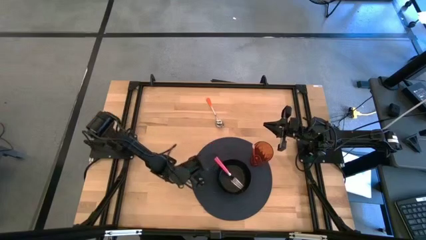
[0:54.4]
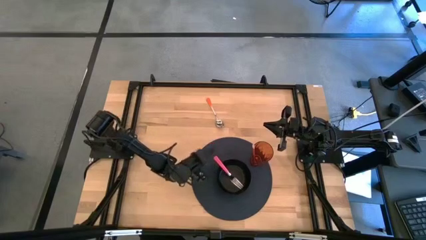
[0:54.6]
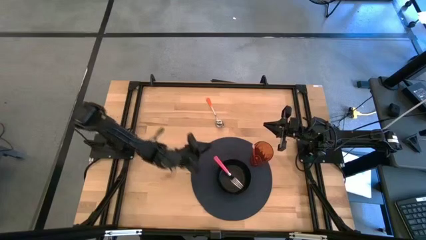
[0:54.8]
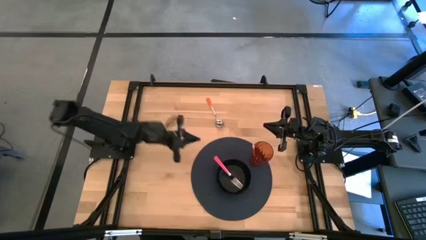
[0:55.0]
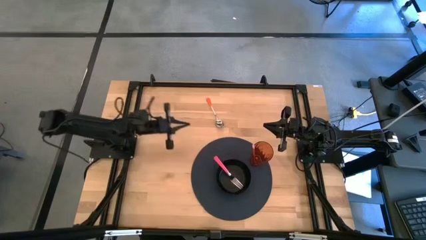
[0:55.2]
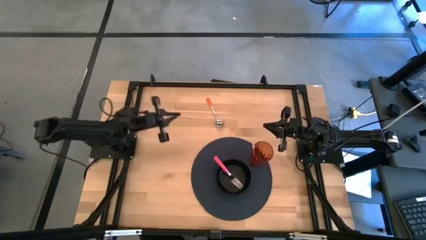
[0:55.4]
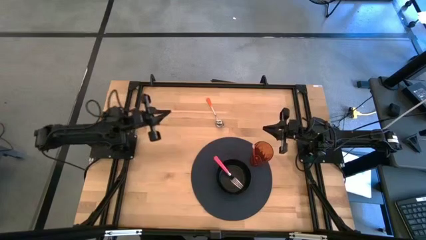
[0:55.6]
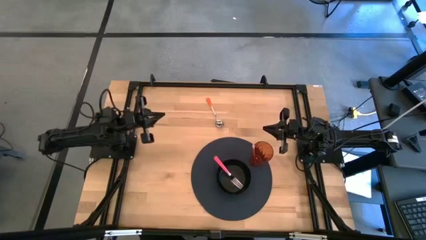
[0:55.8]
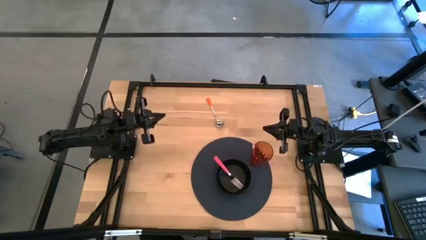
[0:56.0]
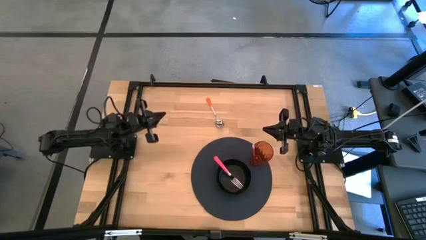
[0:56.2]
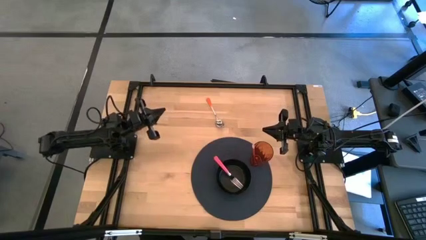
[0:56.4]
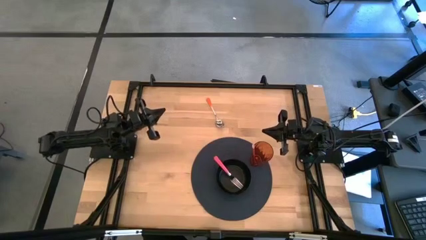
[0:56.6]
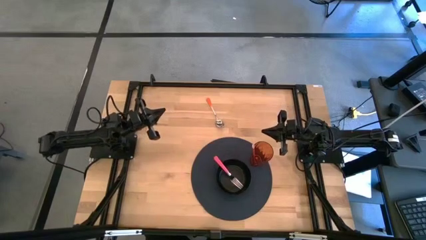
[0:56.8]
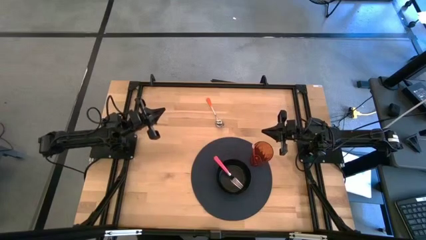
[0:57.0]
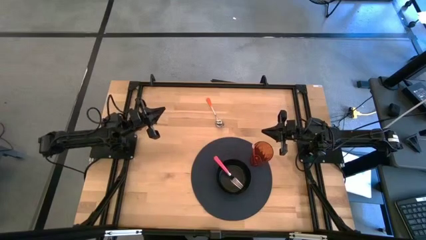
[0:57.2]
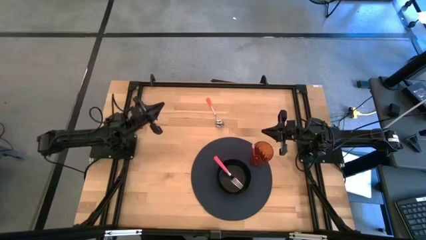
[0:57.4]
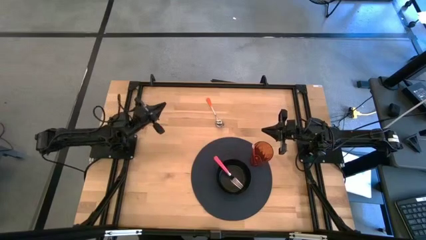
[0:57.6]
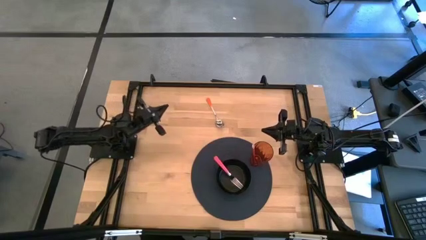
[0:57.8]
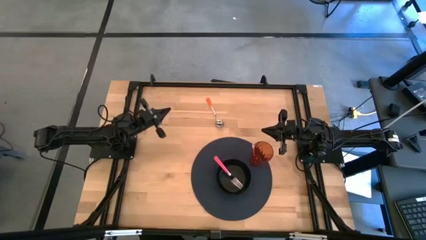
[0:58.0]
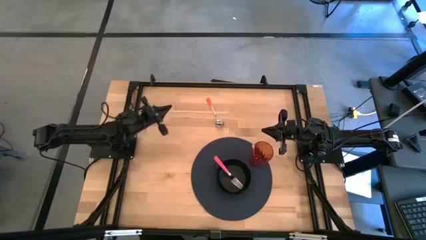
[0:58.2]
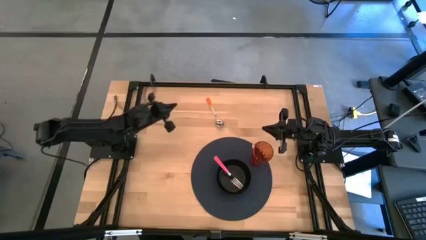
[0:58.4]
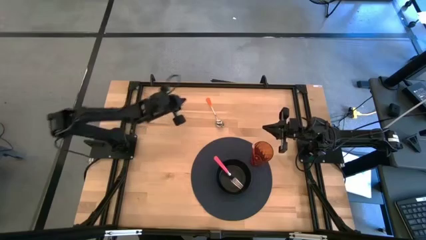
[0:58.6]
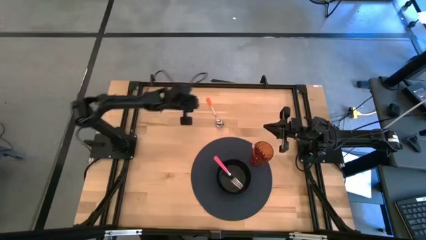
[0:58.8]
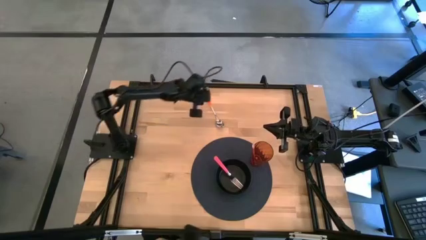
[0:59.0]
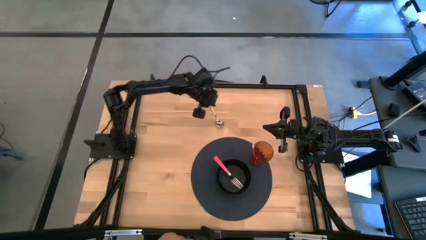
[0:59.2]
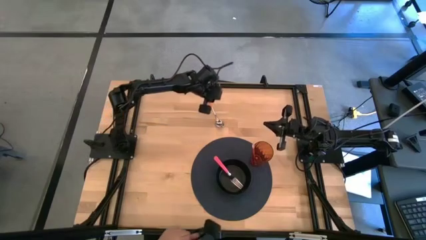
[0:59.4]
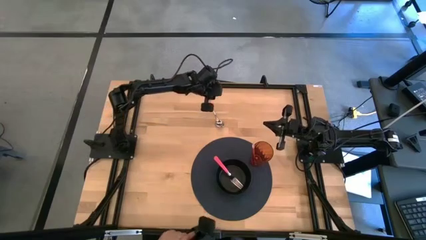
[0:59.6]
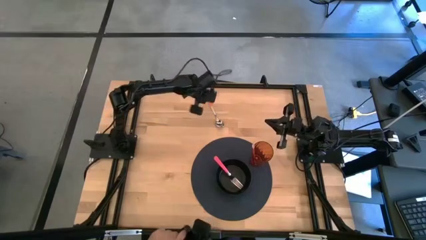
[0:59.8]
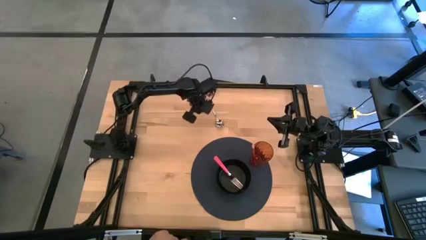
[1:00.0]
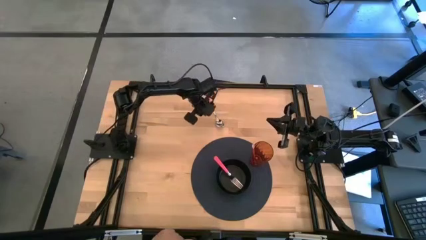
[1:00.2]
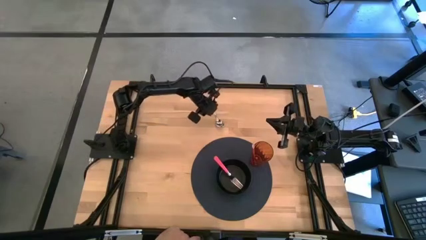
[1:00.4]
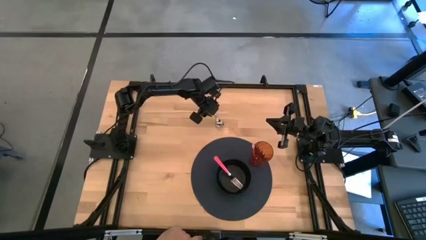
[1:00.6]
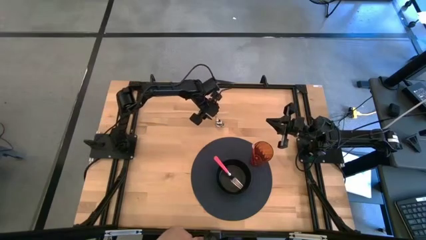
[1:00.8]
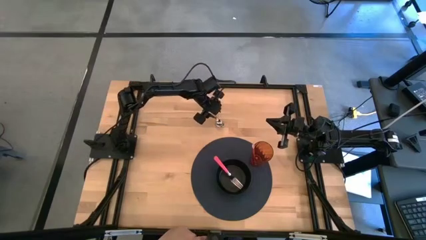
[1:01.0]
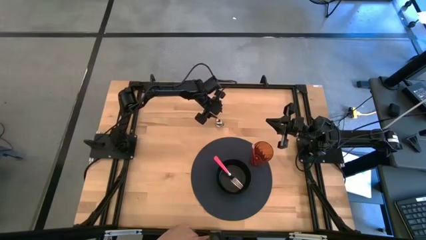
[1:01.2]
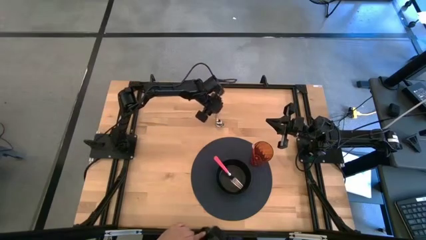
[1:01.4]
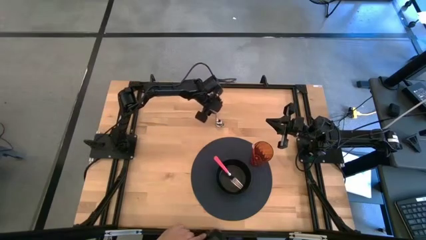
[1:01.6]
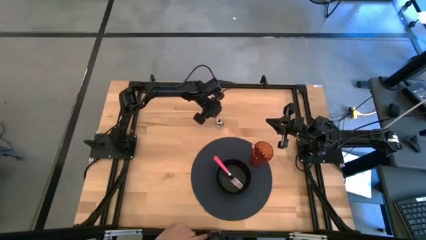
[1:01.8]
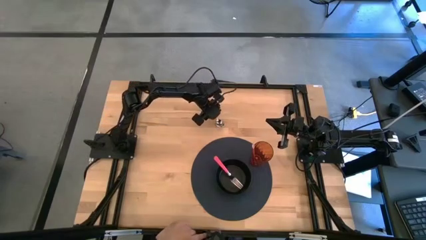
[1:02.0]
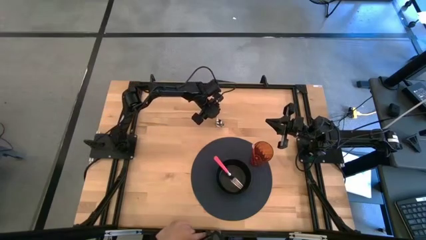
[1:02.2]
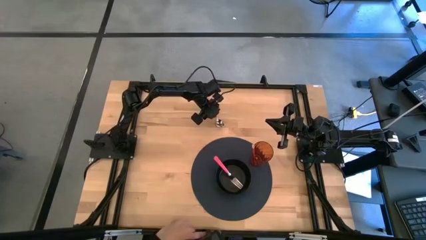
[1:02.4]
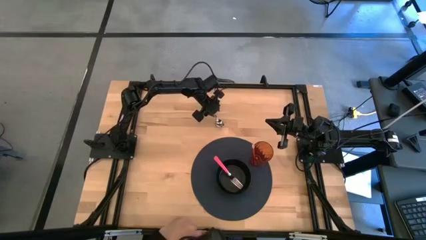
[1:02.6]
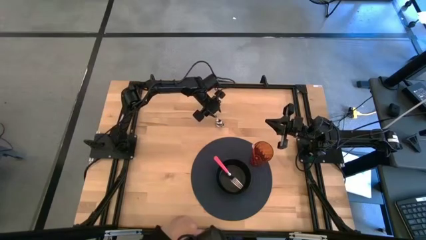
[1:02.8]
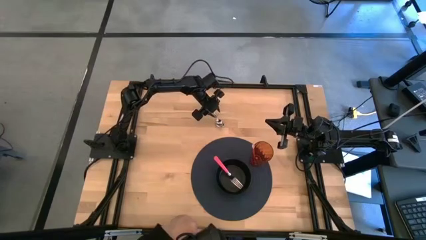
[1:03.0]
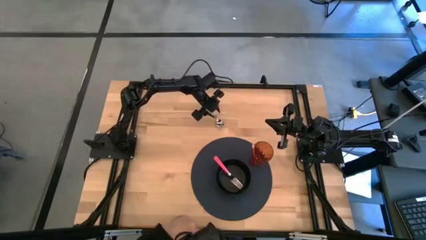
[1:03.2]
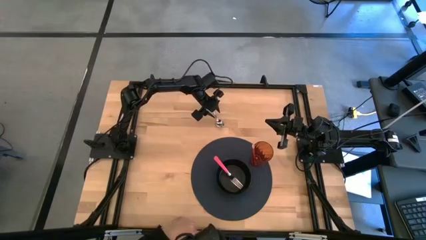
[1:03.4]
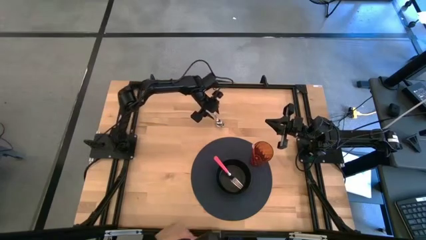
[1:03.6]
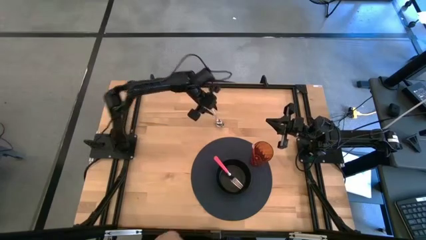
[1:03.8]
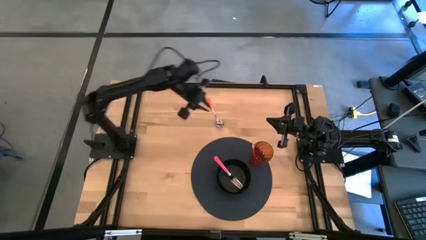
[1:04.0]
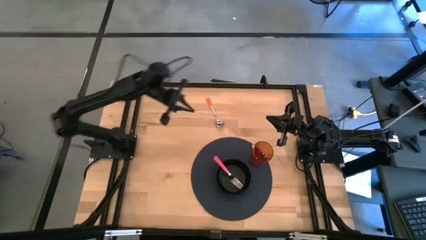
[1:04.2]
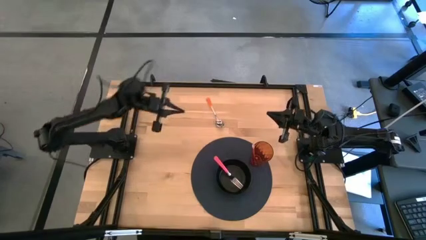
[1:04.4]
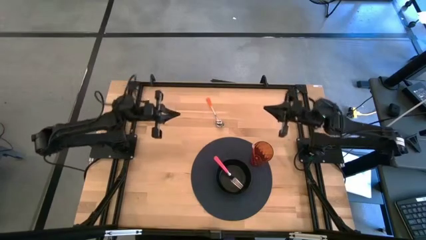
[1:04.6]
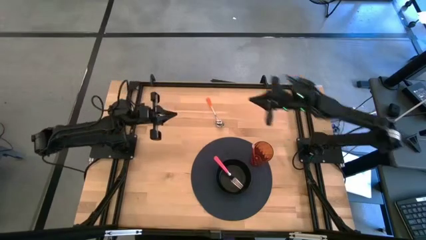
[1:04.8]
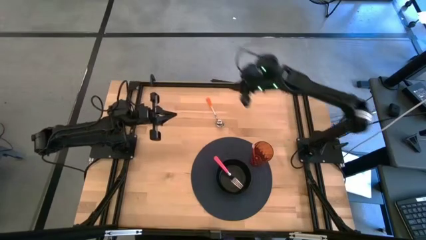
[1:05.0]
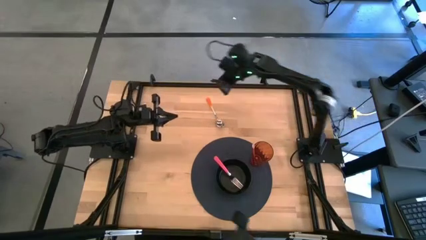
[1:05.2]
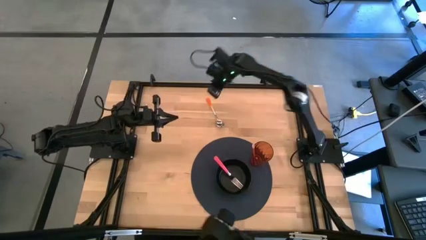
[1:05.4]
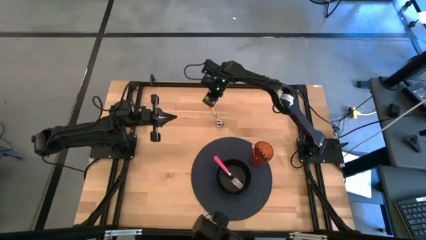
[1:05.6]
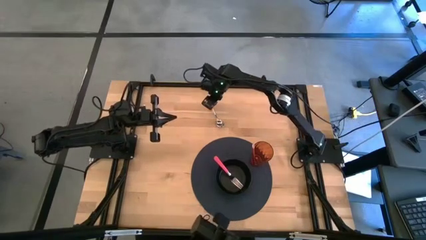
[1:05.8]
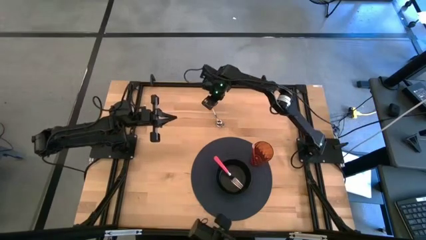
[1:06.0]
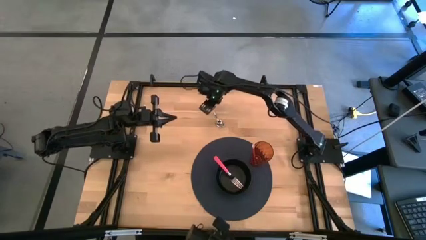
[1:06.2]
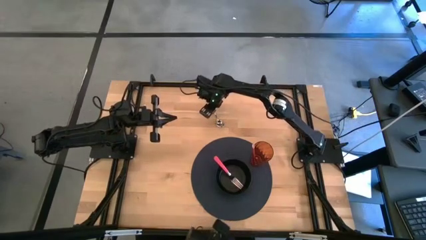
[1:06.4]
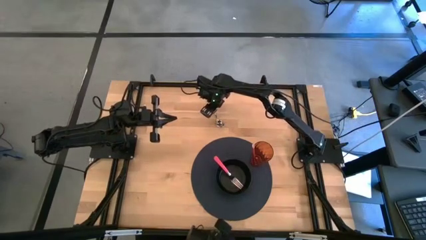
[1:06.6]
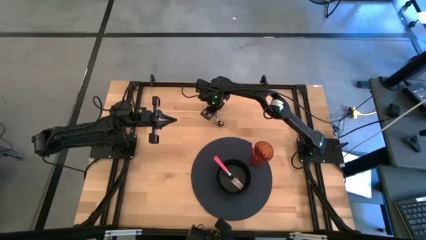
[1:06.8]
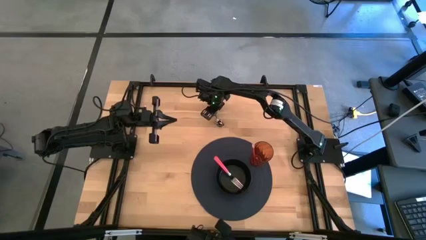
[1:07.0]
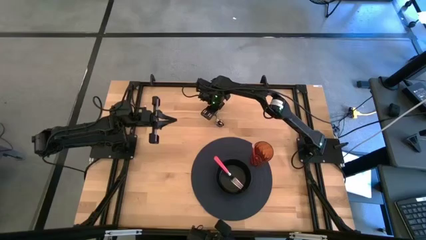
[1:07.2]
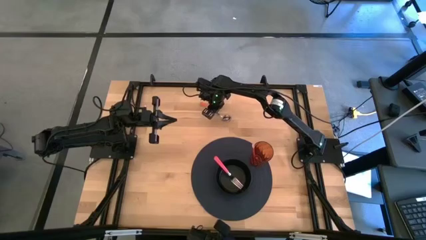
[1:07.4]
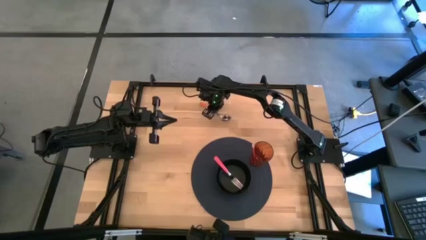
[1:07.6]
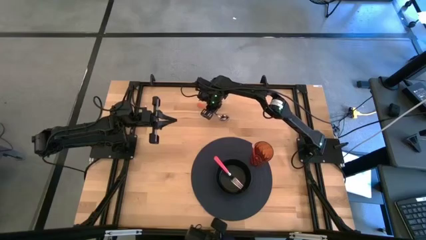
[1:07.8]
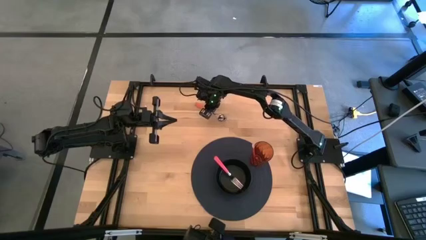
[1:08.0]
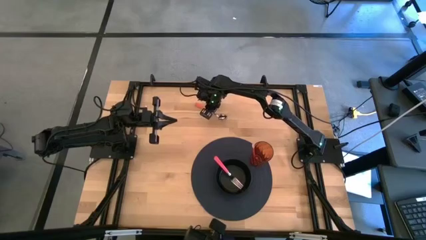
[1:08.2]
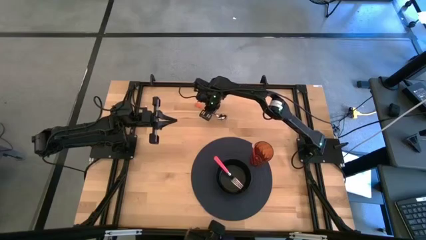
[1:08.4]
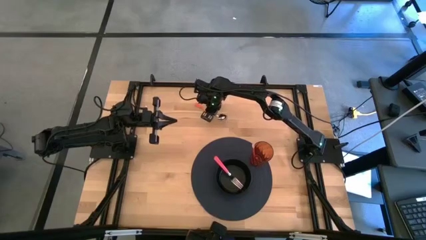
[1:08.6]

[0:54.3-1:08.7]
Task: Pick & Place Utensil
Put the orange spoon into the black bowl on the black placemat

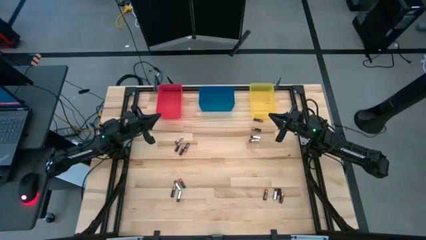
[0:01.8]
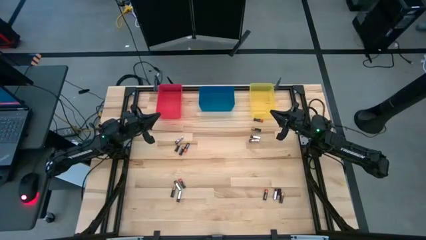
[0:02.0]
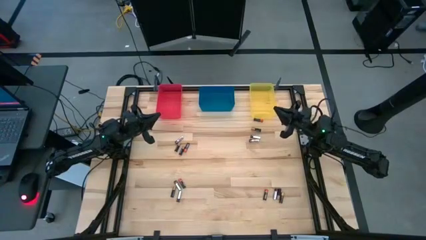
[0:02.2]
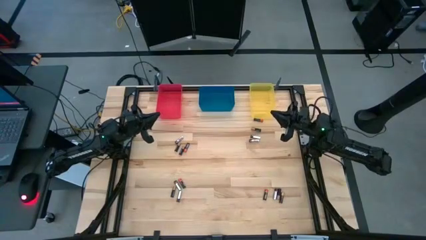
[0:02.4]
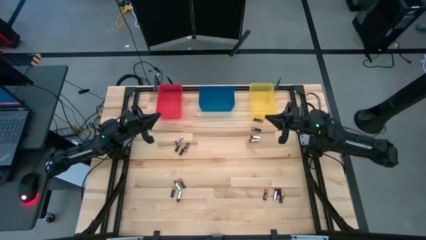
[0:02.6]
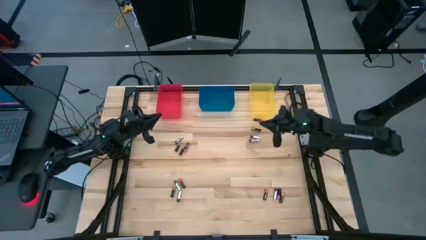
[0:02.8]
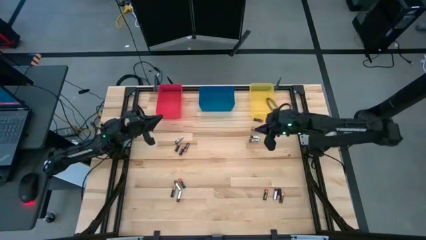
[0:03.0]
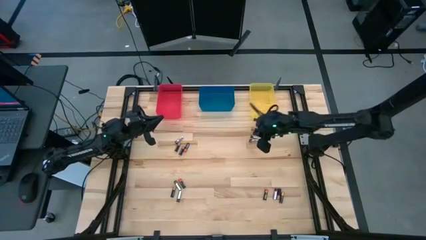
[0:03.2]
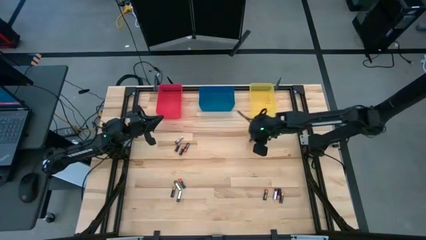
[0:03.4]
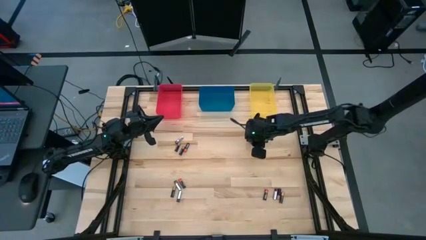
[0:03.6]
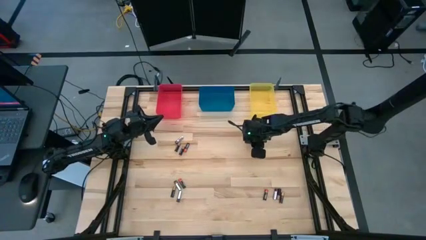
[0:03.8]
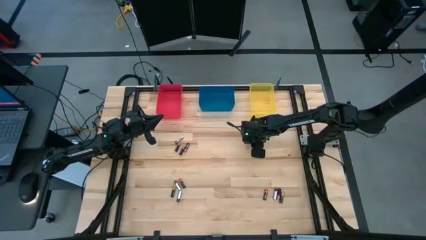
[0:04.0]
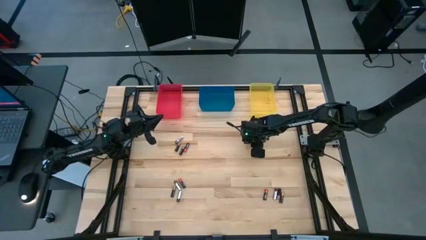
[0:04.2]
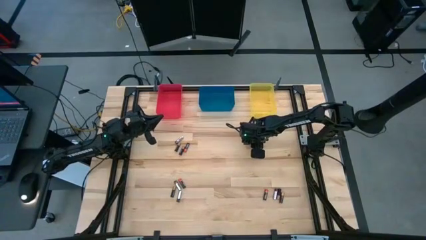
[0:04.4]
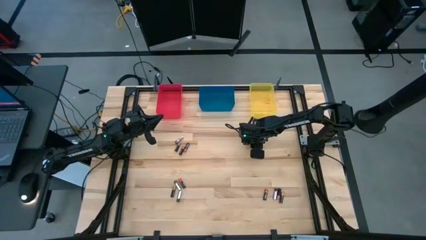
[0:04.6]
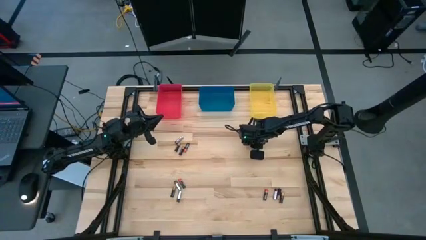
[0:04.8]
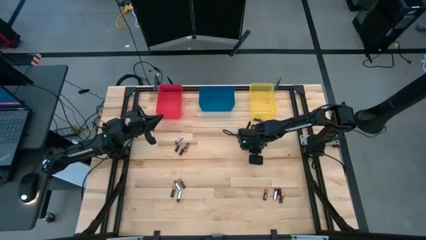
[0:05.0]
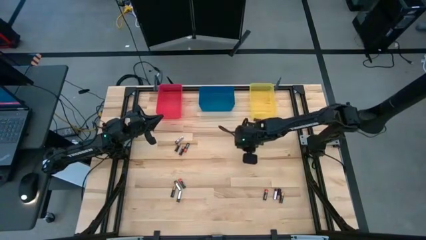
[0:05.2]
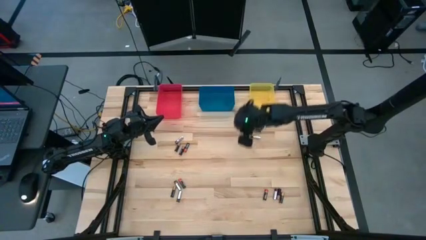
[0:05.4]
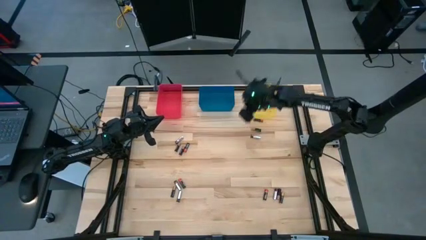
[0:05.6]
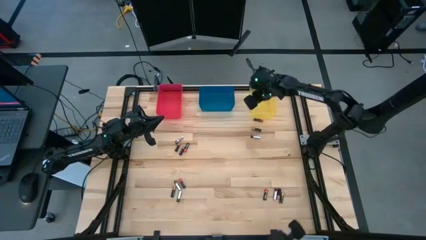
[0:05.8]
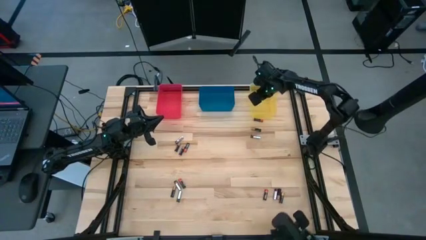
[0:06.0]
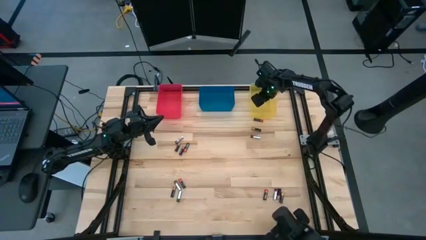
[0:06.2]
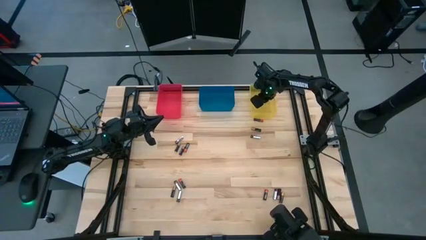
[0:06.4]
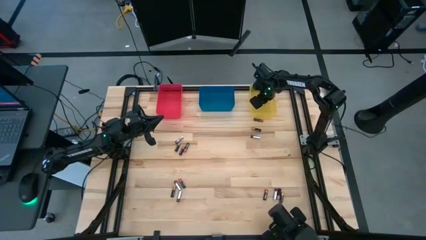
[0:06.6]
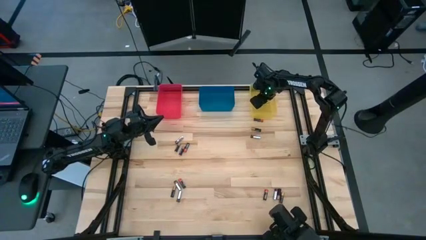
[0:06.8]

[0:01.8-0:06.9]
Task: Sort batteries
Put the silver battery into the yellow bin
